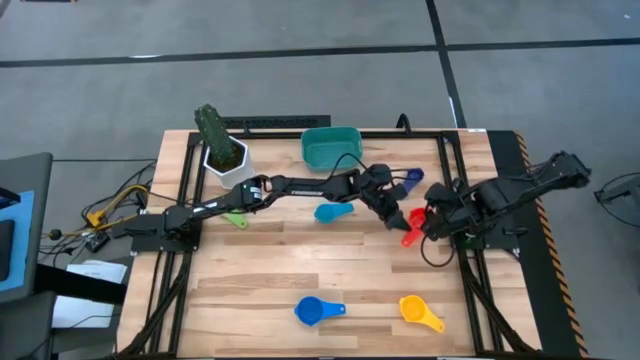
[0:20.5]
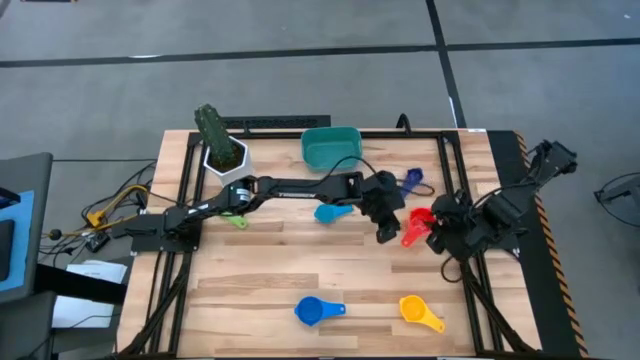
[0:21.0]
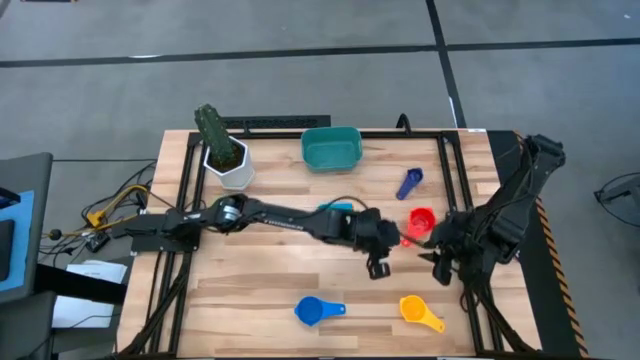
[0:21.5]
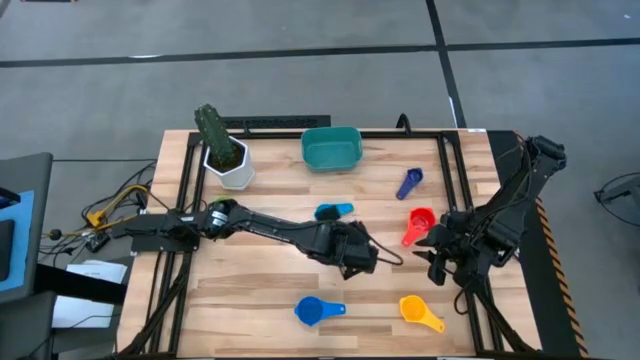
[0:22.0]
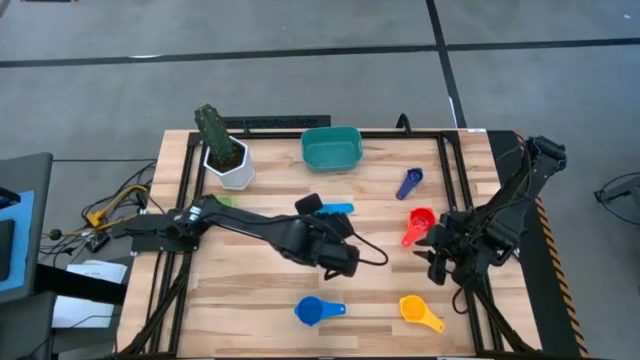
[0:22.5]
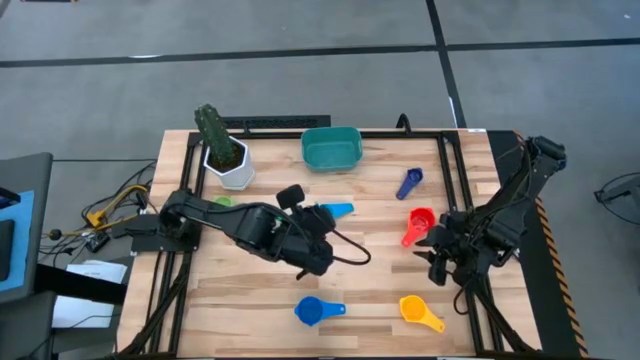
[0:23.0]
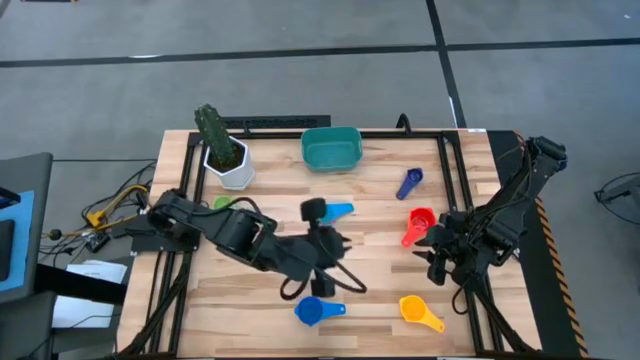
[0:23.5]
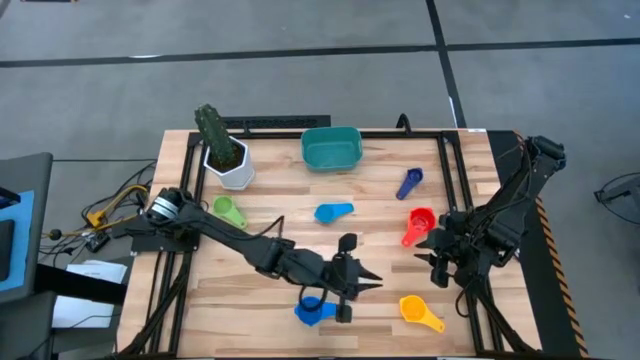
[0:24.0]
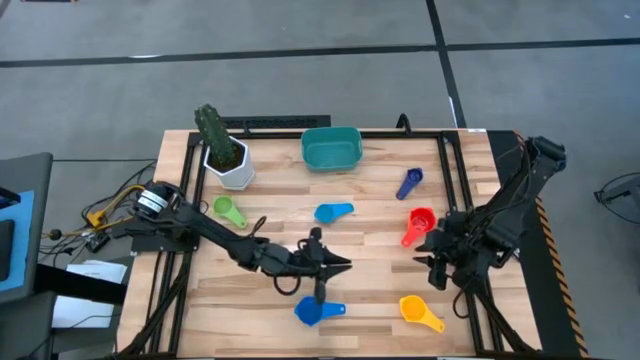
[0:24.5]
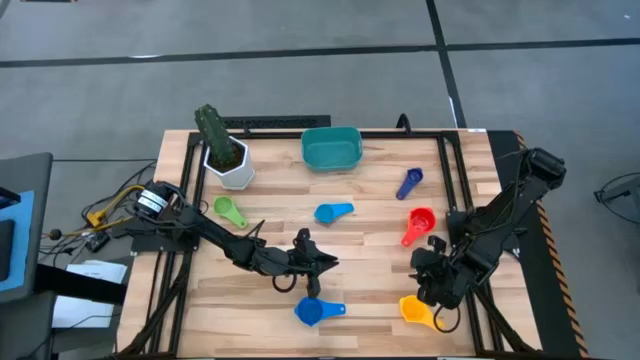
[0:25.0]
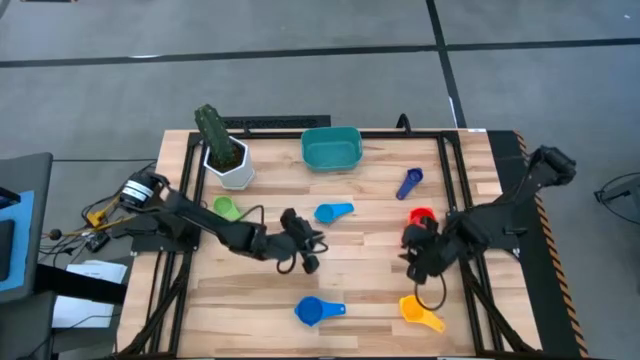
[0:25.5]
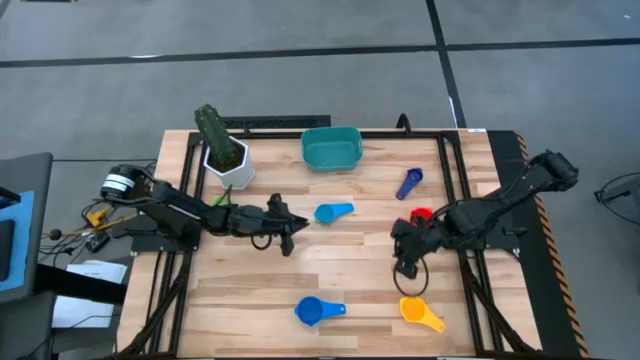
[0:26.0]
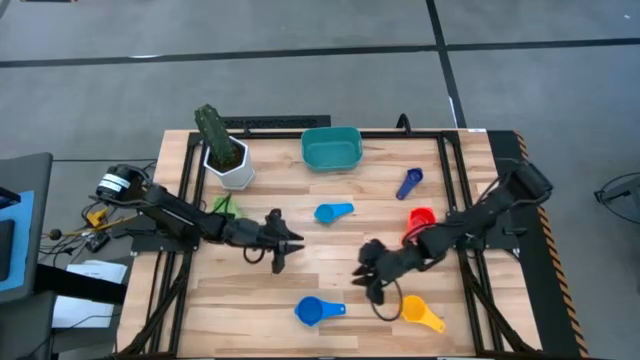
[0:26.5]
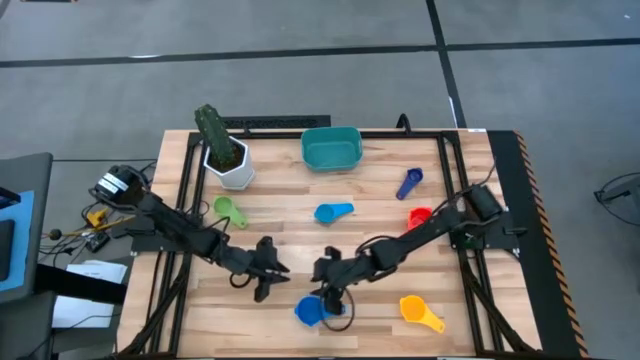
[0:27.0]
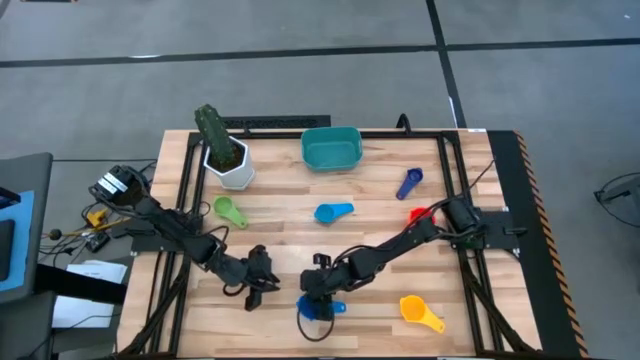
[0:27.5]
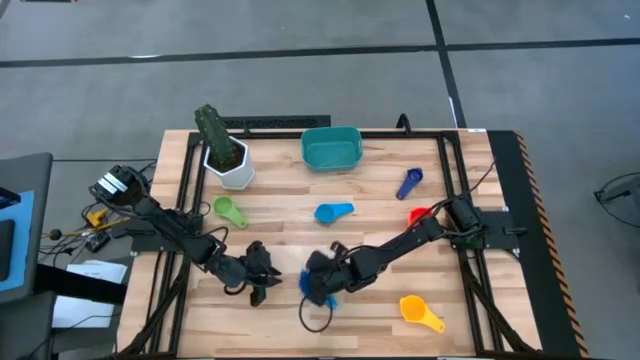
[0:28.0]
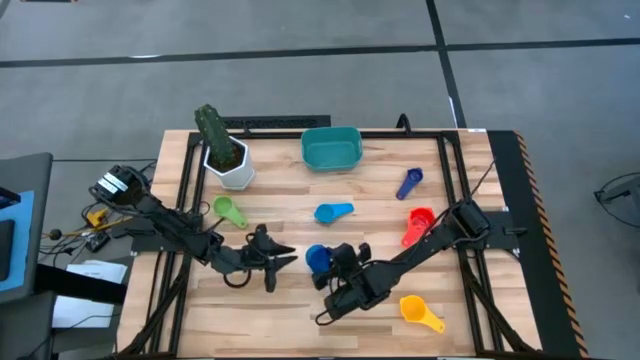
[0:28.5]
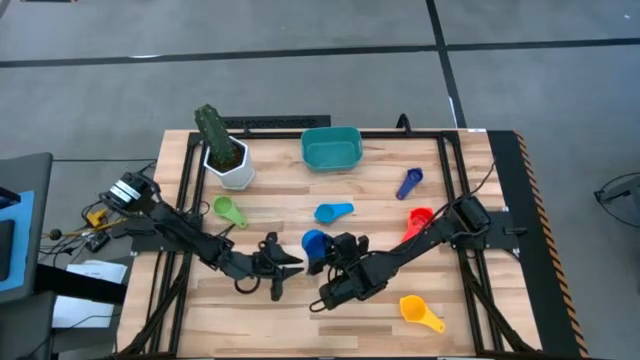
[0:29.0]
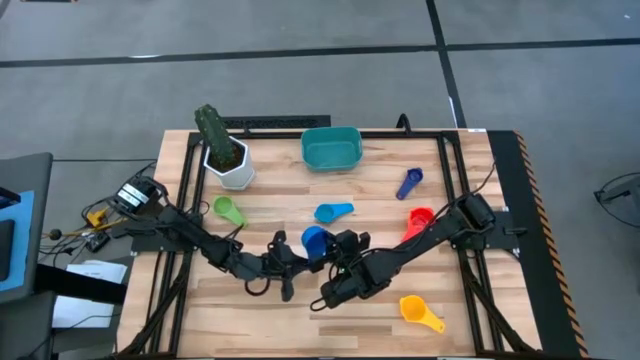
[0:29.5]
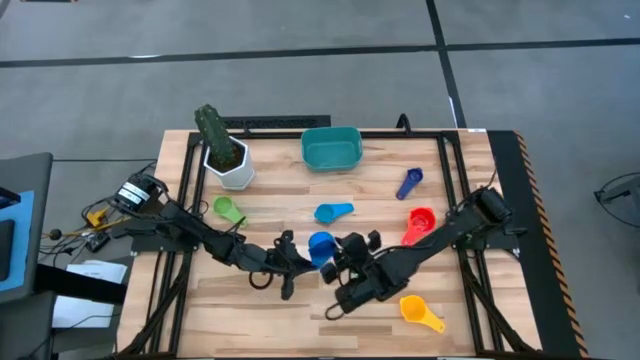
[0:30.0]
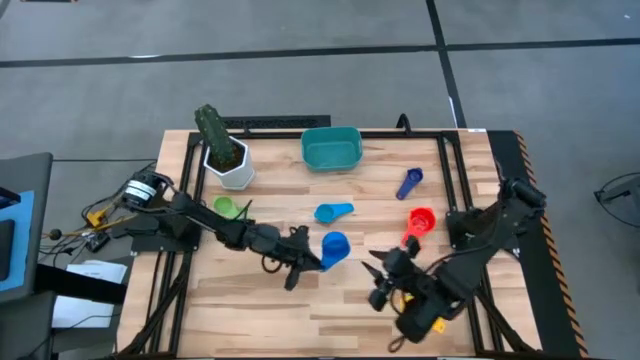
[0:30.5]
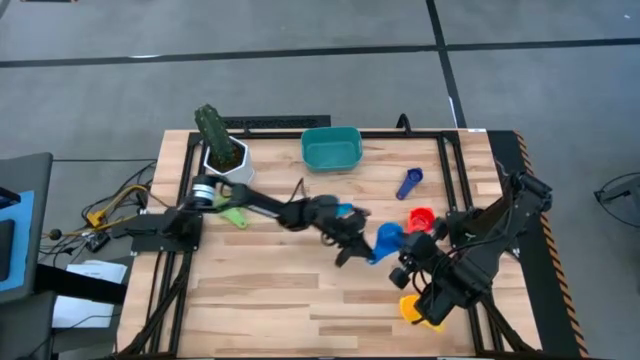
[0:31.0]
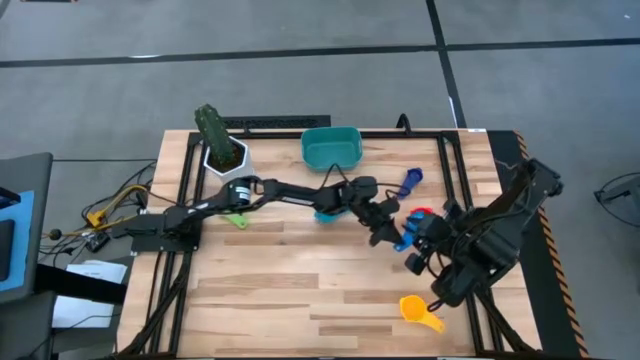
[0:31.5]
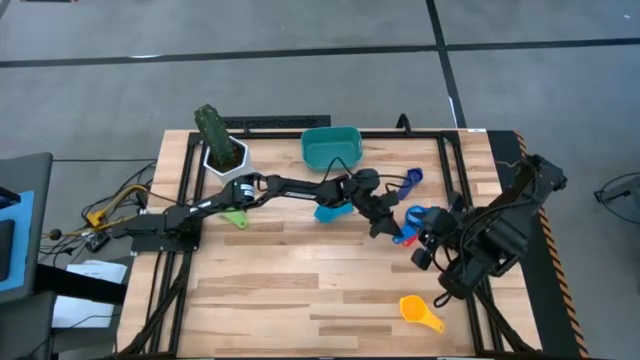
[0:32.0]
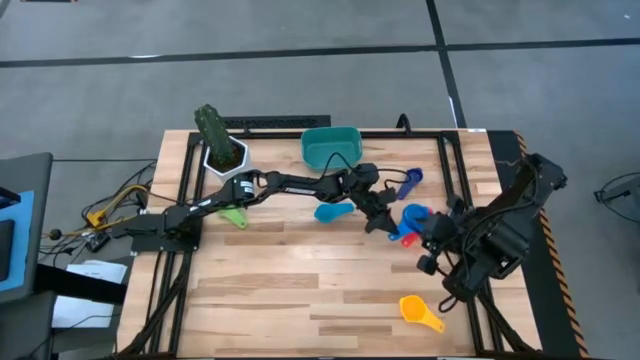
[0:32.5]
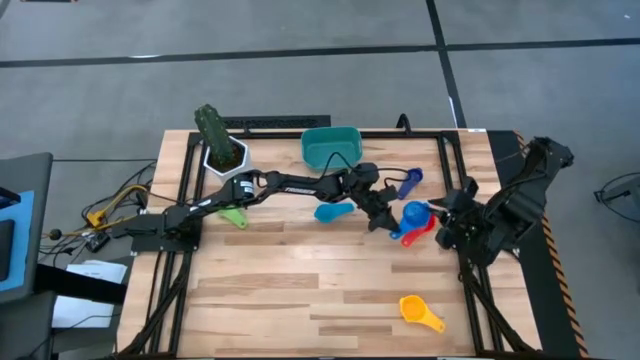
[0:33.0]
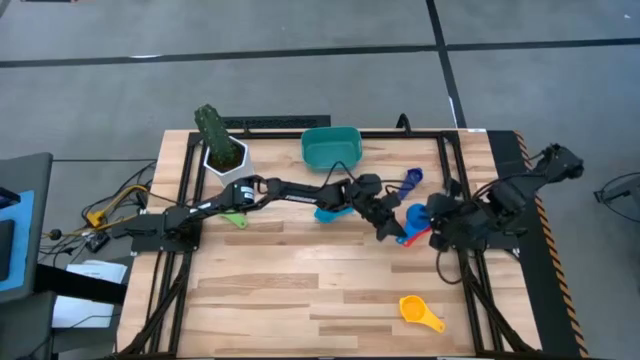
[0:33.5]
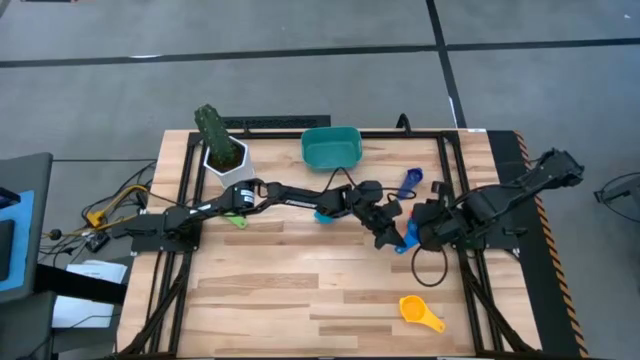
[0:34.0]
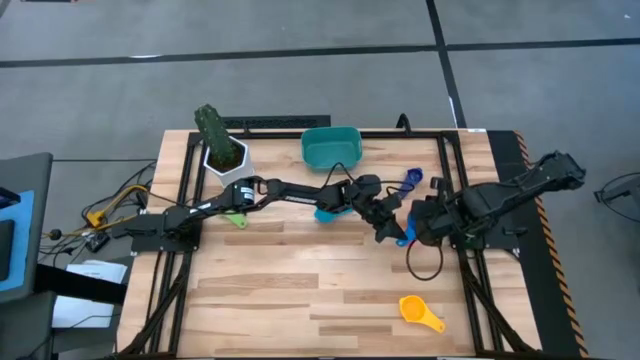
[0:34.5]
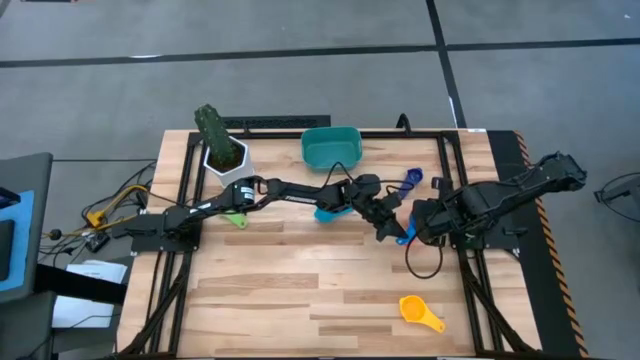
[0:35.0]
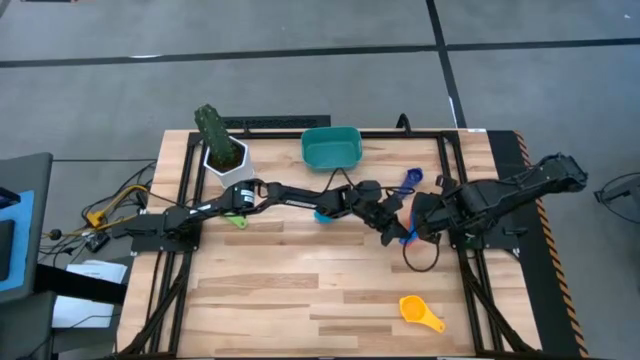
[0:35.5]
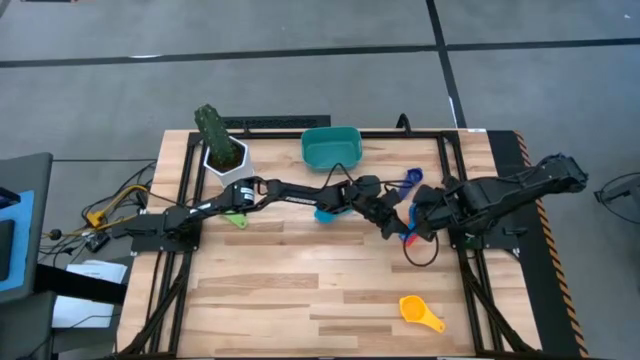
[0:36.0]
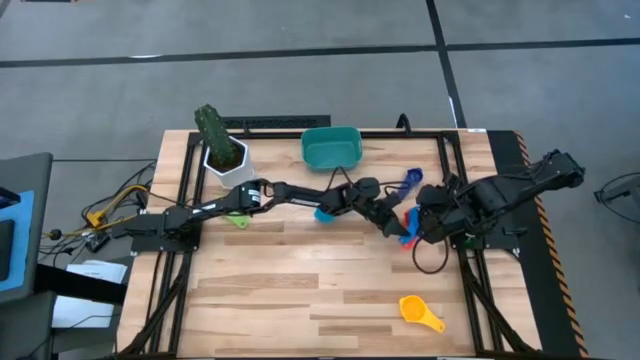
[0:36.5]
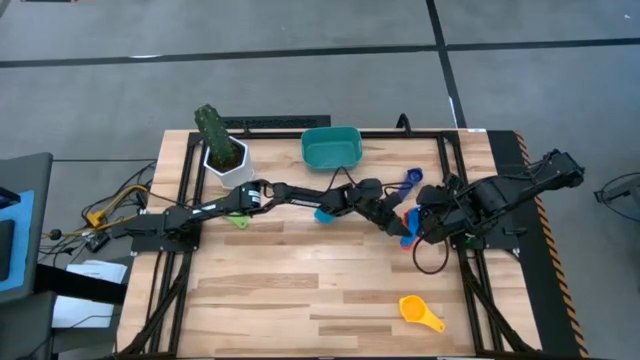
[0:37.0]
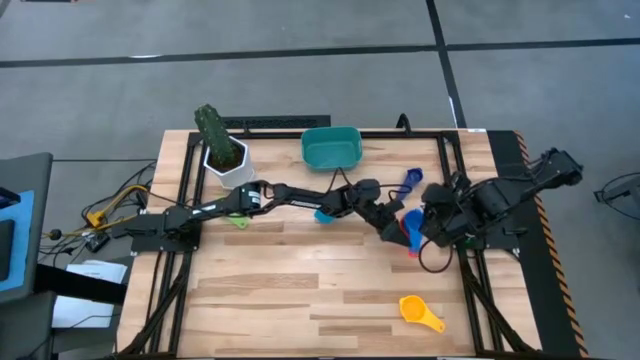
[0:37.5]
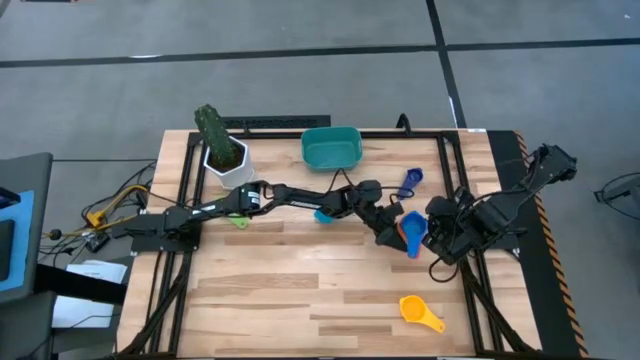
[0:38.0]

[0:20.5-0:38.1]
Task: Nest measuring cups in basket
Stack the large blue measuring cup into the red measuring cup

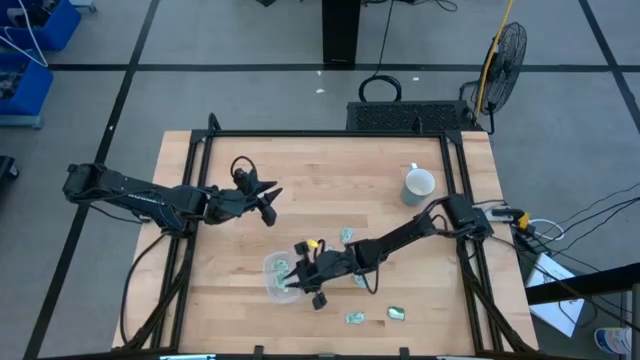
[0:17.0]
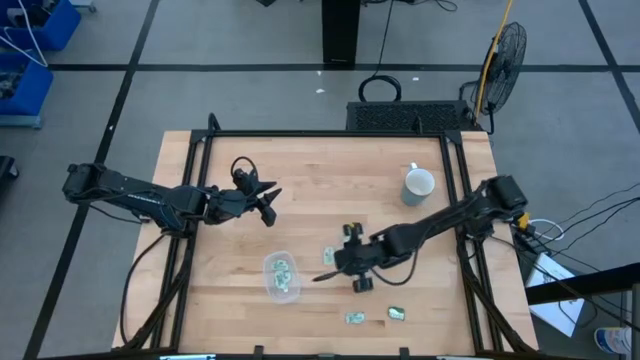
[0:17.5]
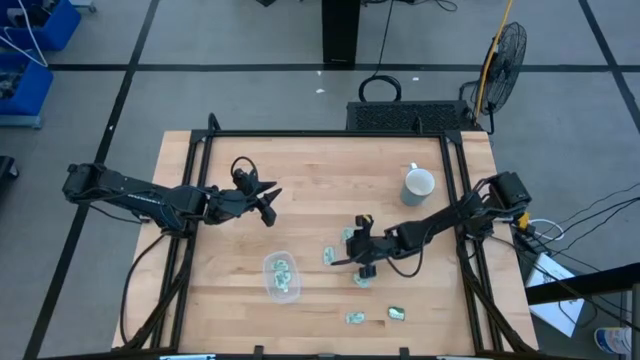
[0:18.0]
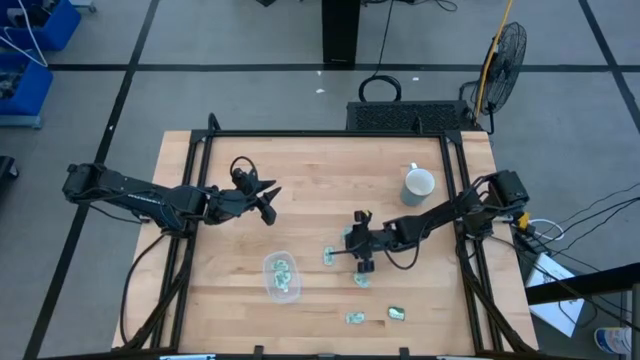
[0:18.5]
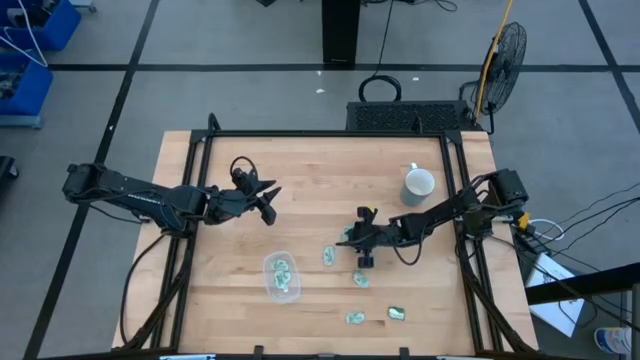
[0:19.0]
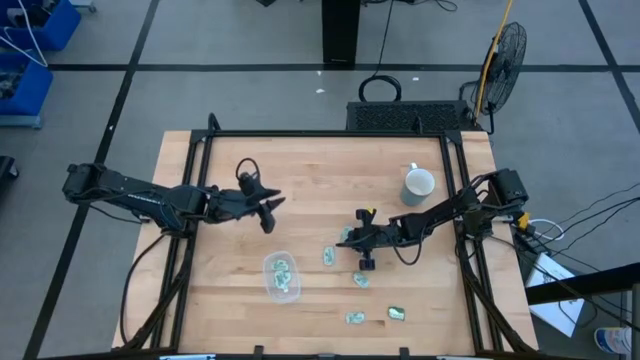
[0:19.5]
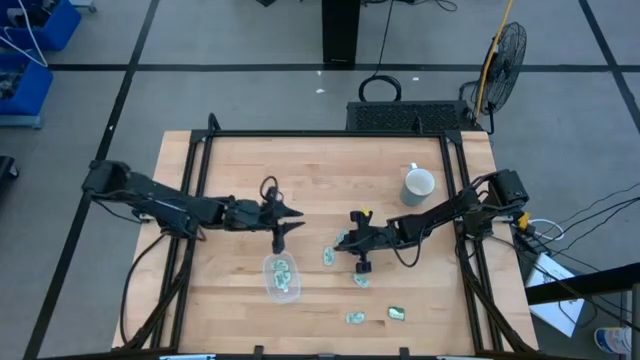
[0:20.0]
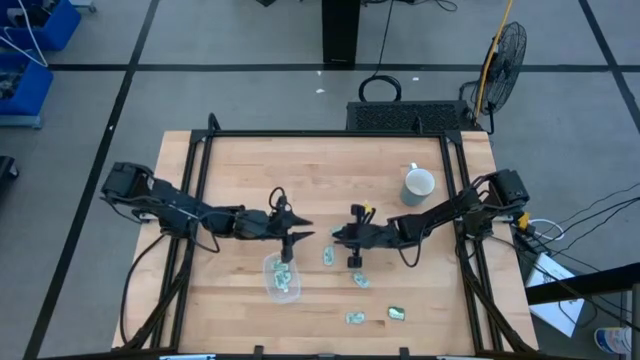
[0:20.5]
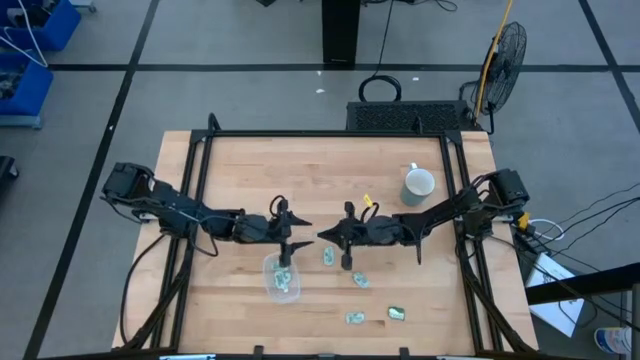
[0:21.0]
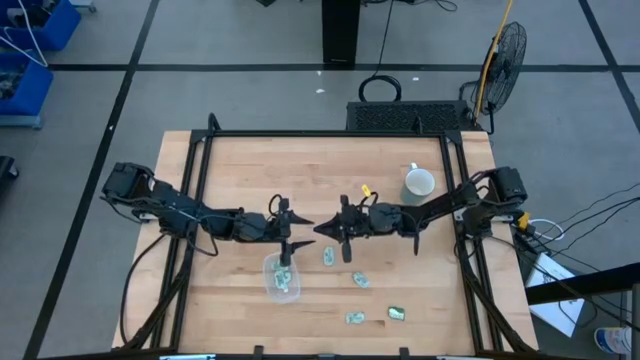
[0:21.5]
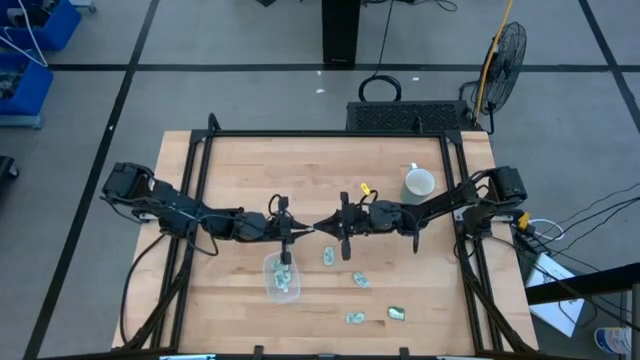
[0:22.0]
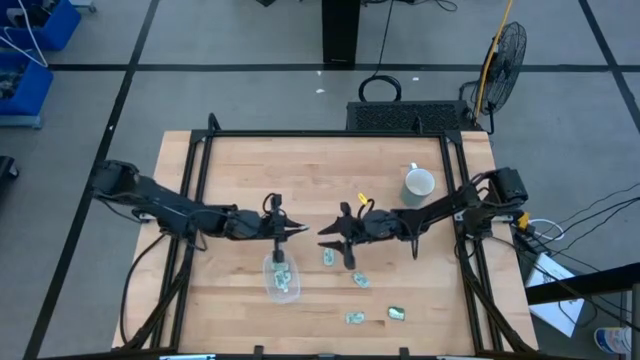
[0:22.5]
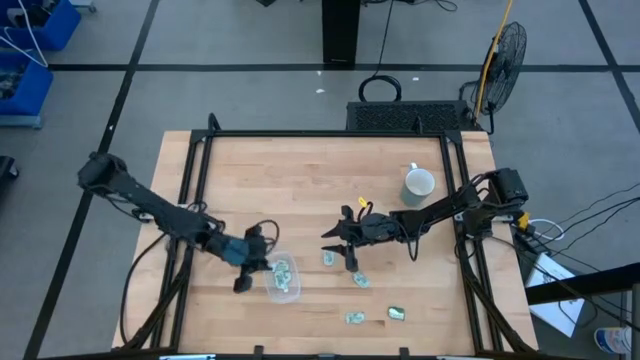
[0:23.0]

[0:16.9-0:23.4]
Task: Pick and place Stevia / Truvia into bins
Put the stevia packet into the transparent container
